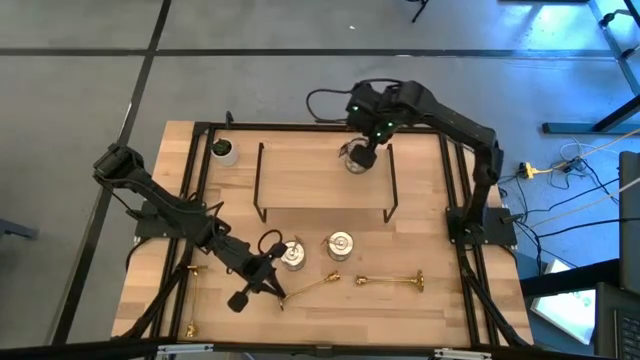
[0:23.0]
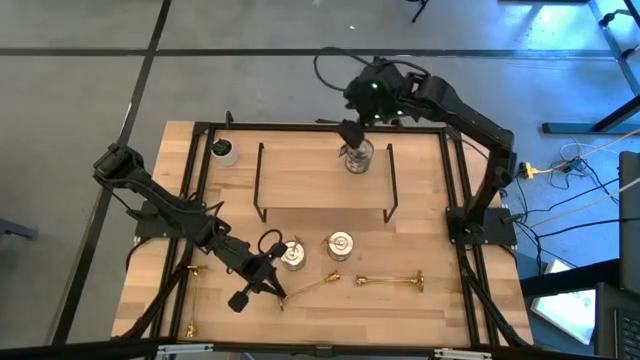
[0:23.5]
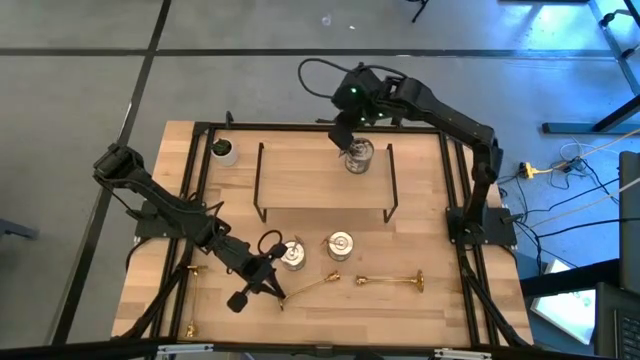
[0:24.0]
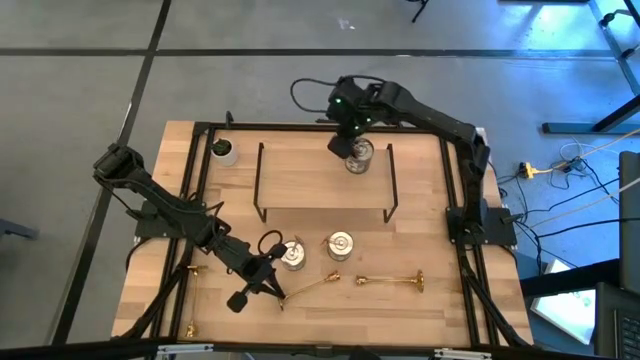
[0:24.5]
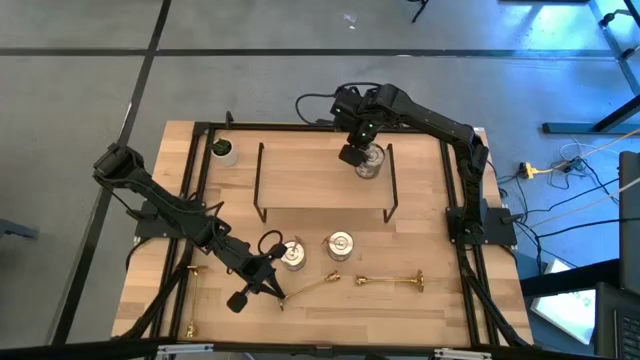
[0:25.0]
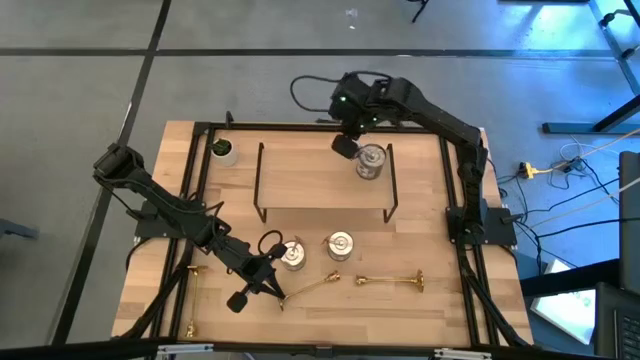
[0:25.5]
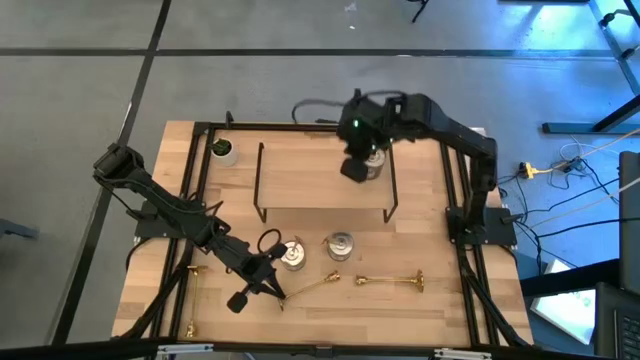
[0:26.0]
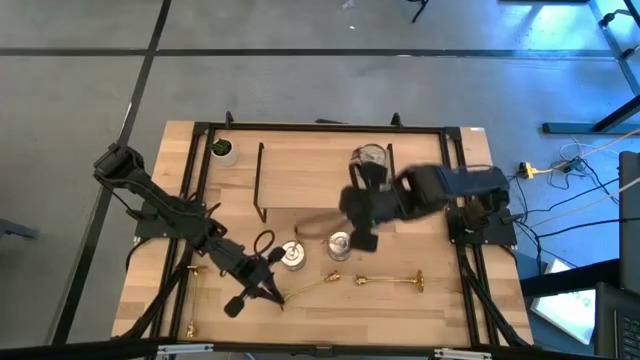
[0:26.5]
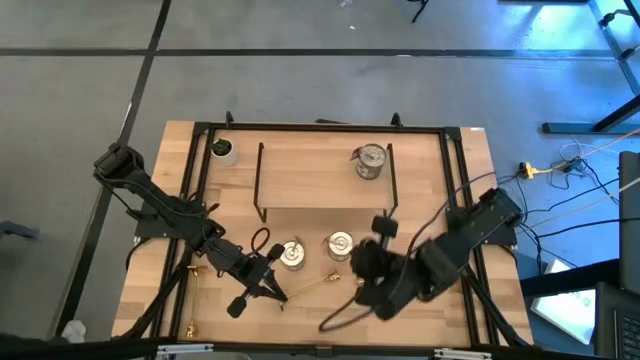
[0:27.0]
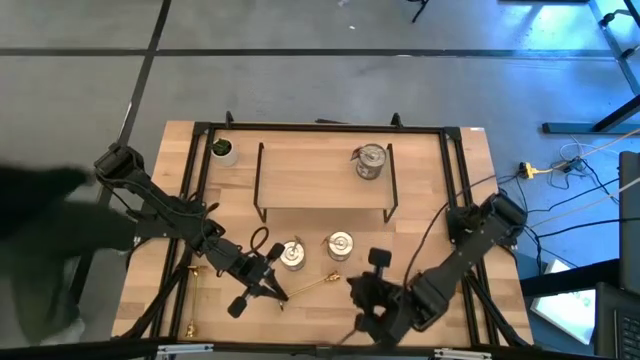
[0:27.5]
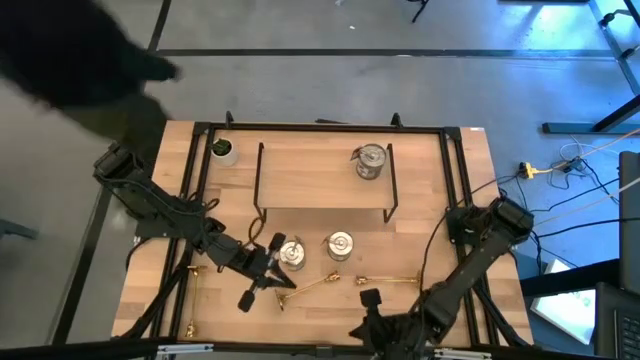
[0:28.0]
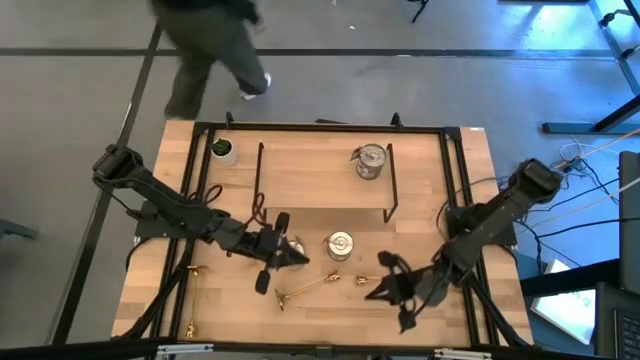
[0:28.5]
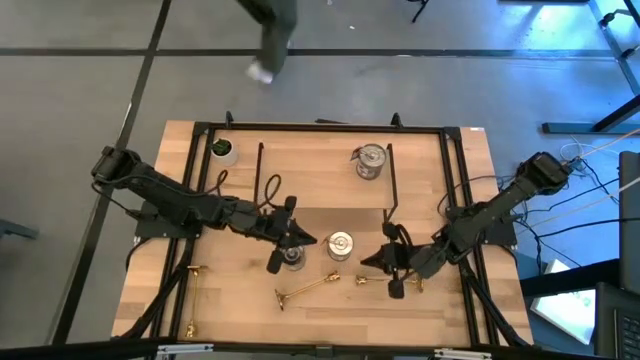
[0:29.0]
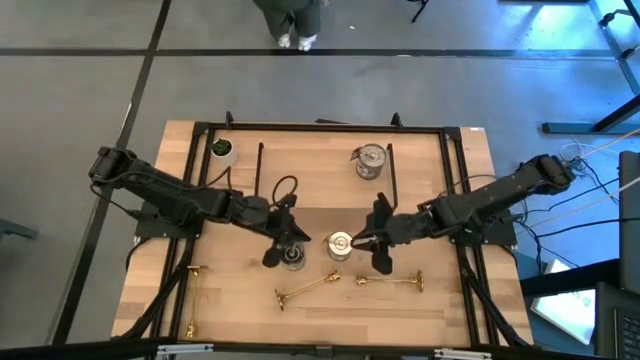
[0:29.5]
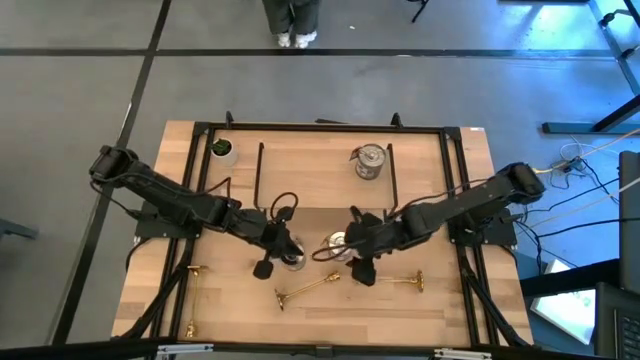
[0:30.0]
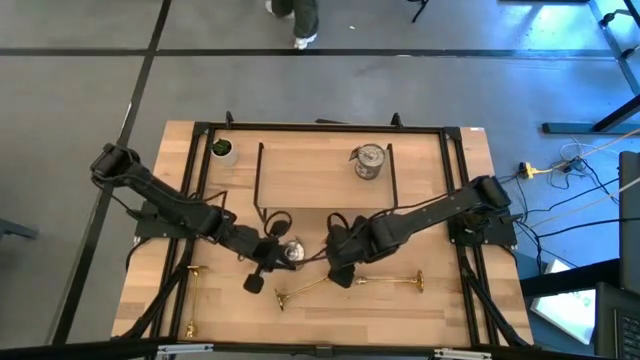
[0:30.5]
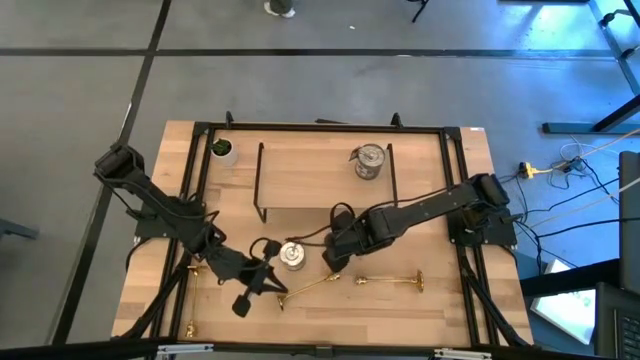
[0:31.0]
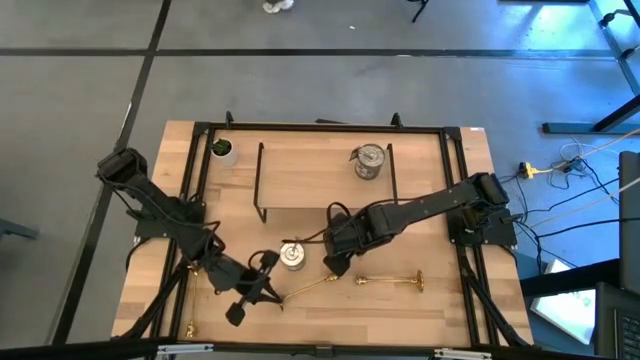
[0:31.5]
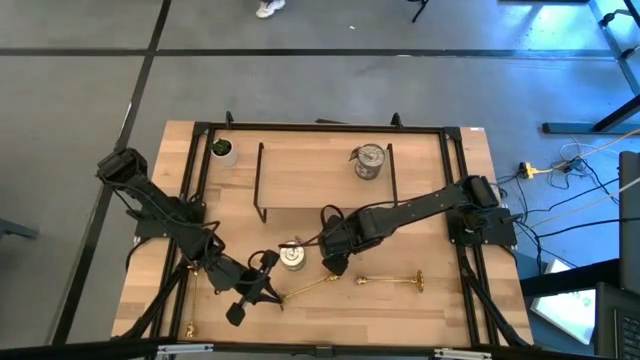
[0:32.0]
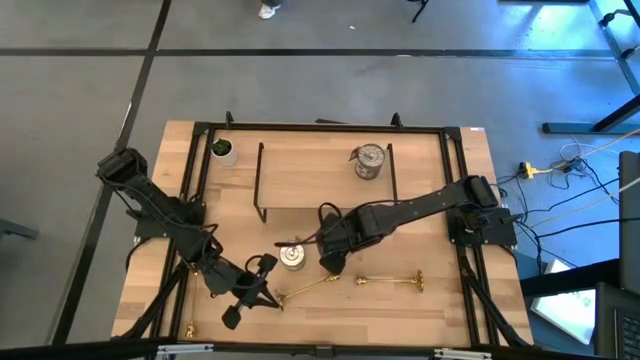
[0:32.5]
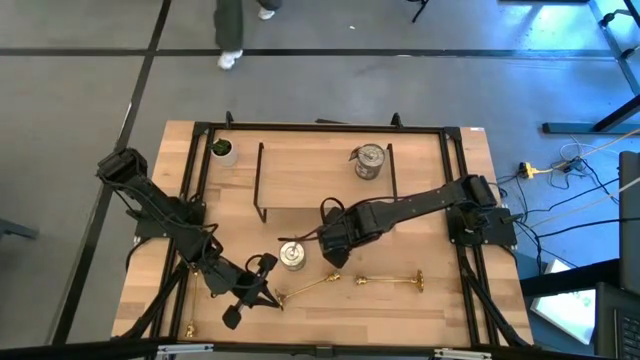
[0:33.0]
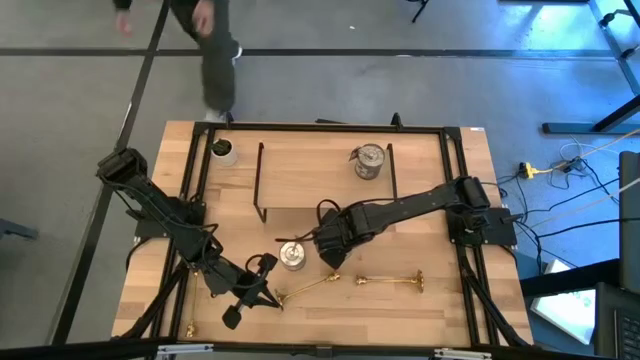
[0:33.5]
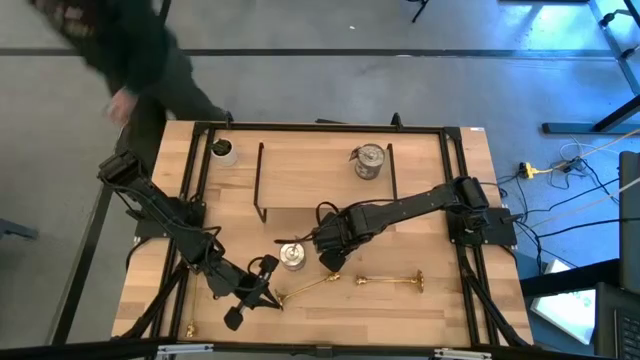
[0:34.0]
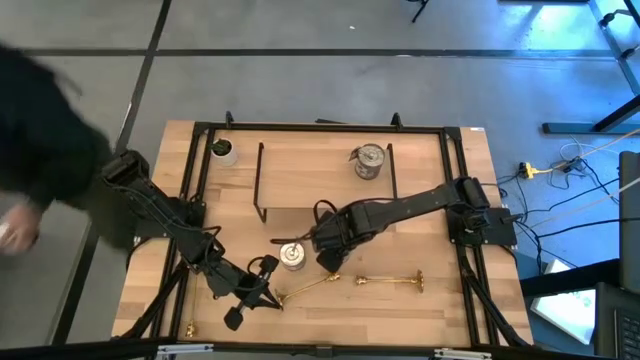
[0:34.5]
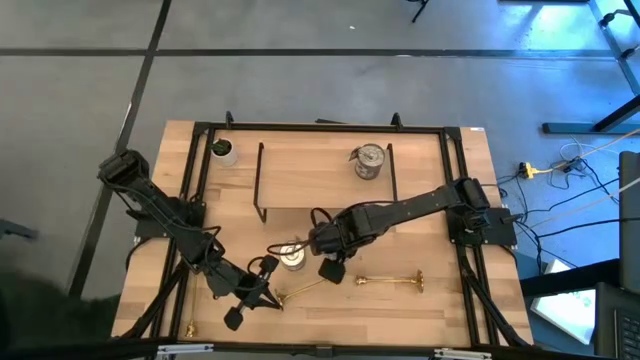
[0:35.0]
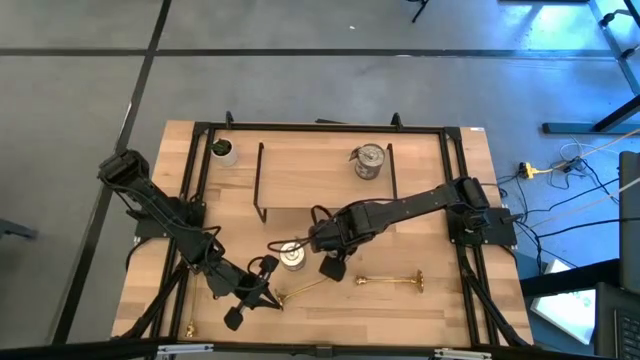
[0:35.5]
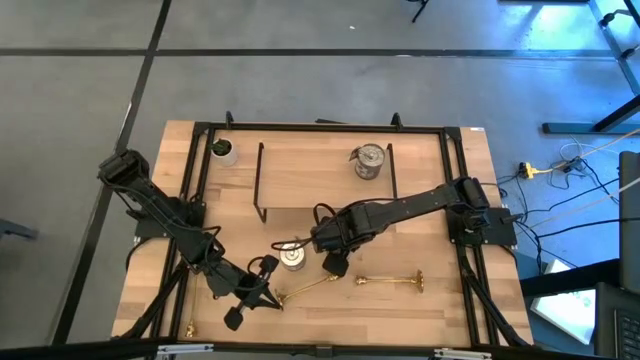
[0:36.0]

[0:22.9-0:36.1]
Task: Pick & Place candle stick holders
Put the right silver scented candle on the shelf

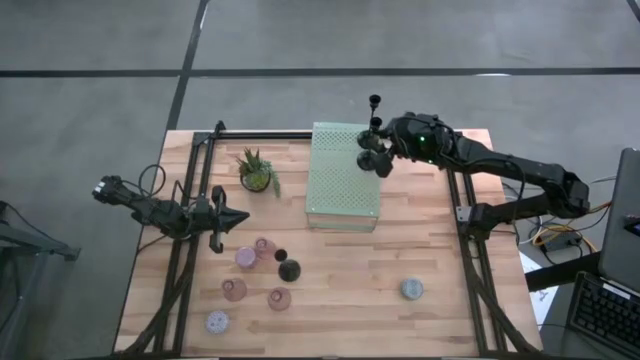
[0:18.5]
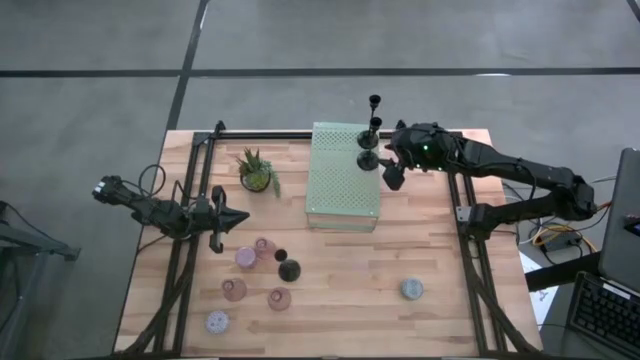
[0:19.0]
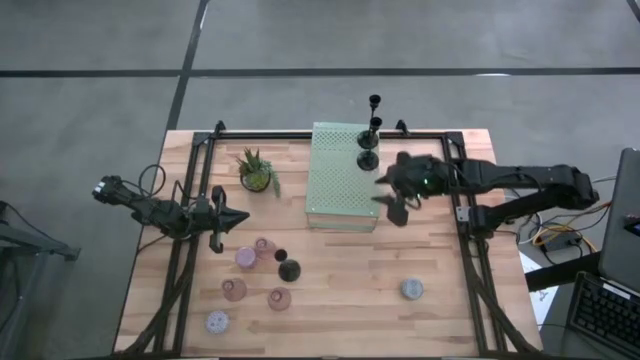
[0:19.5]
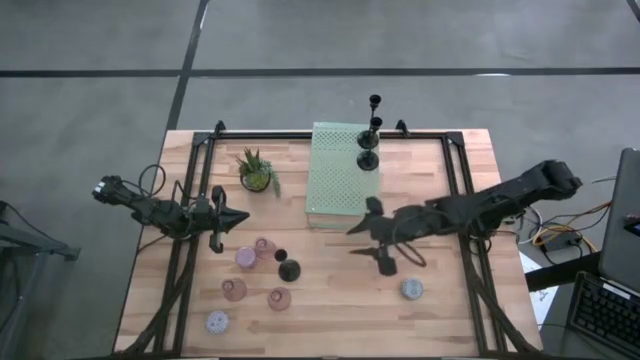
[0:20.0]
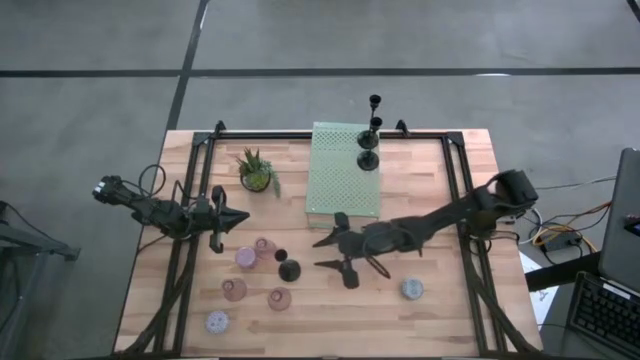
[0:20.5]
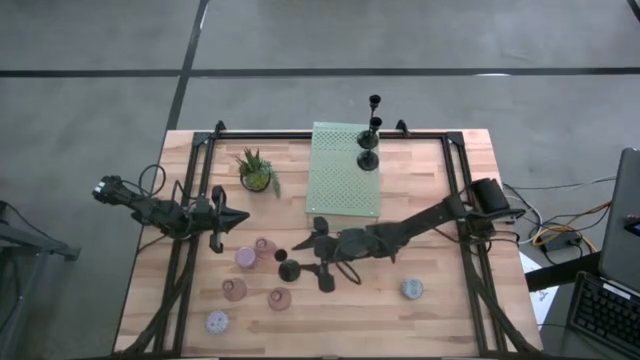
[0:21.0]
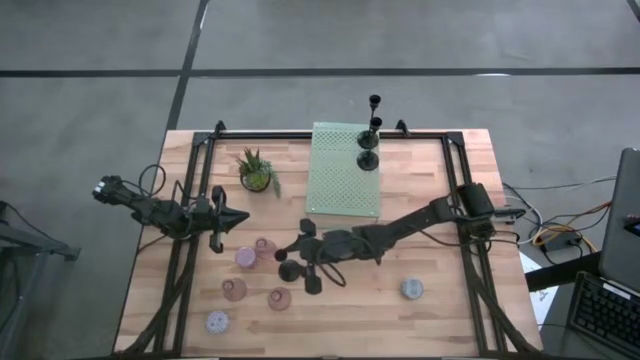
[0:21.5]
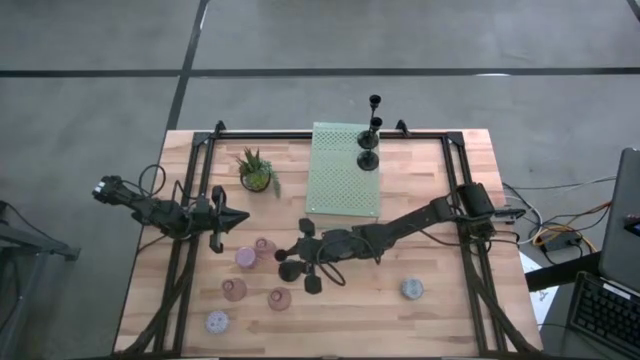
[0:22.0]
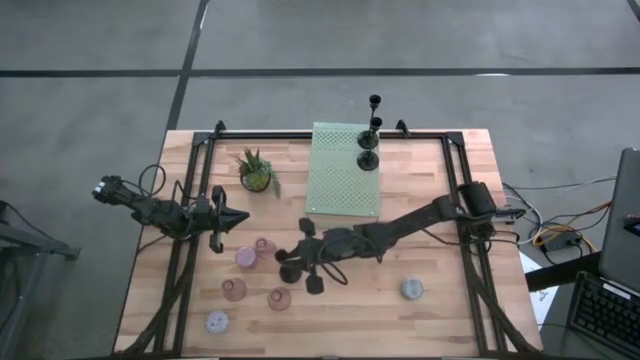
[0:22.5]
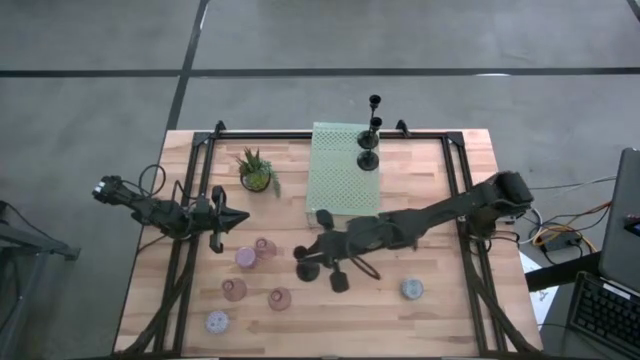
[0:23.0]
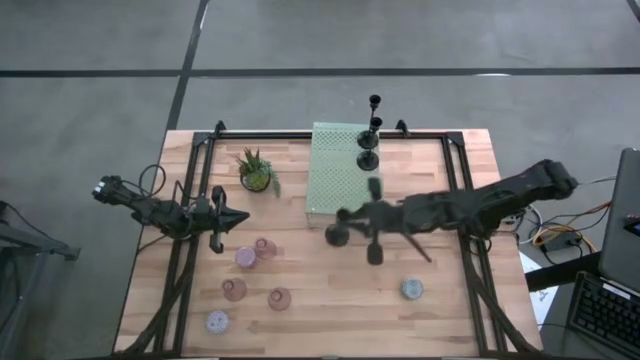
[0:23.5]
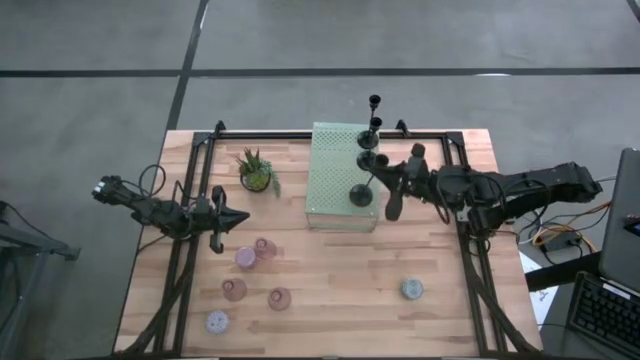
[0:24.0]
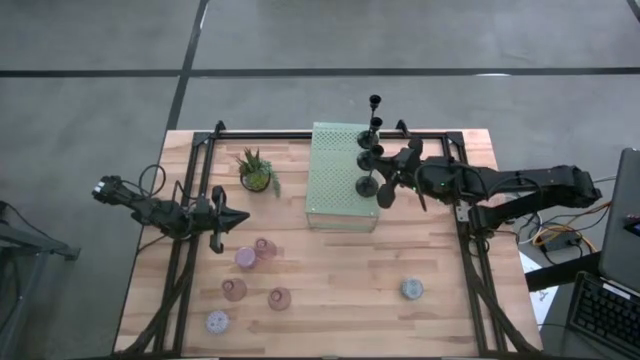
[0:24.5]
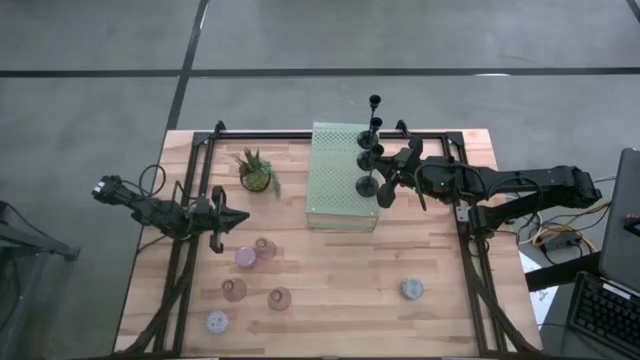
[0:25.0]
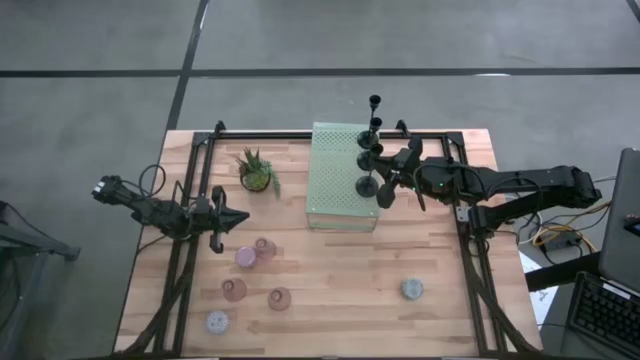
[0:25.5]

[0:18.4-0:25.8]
Task: Pick & Place candle stick holders
Put the black candle holder on the shelf aligned with the other black candle holders
